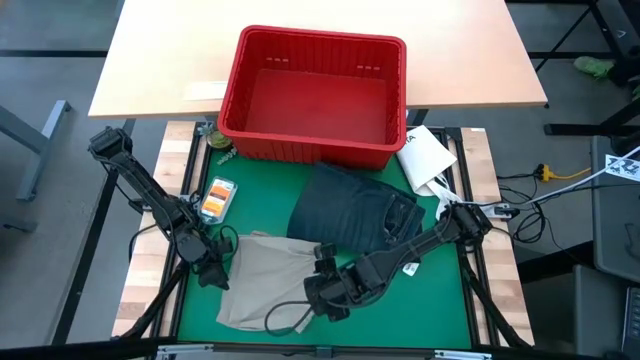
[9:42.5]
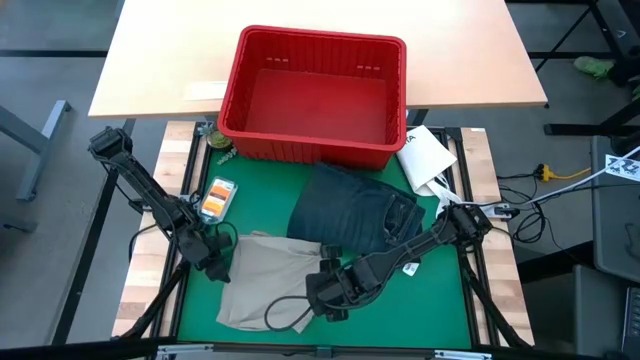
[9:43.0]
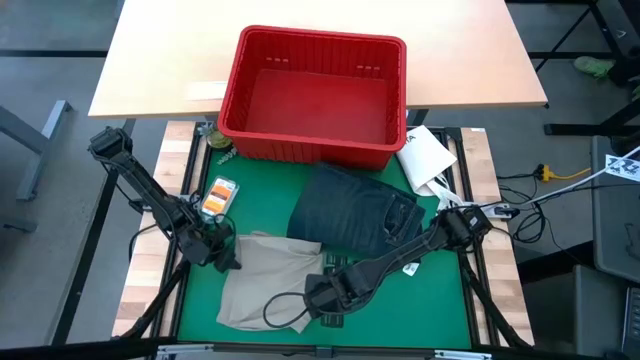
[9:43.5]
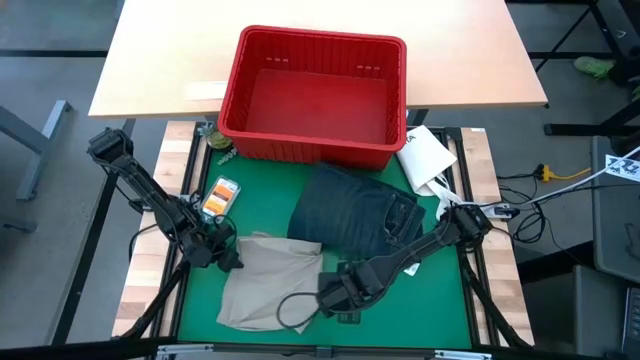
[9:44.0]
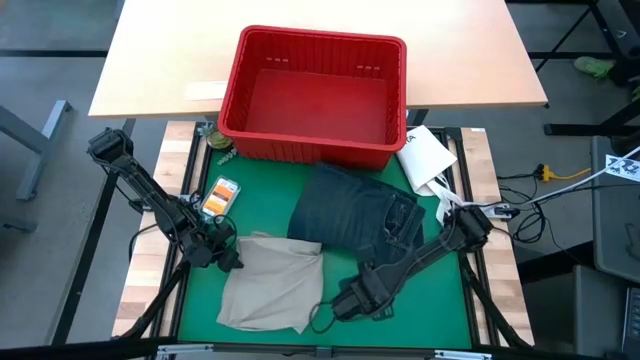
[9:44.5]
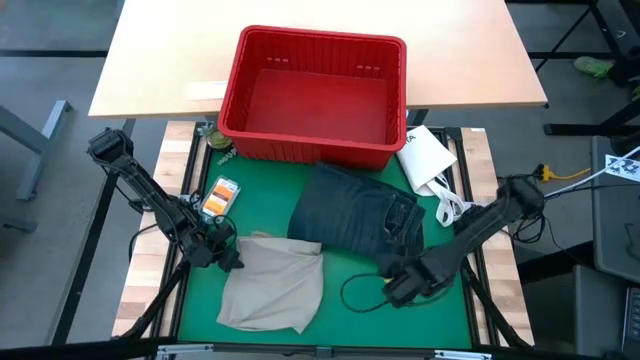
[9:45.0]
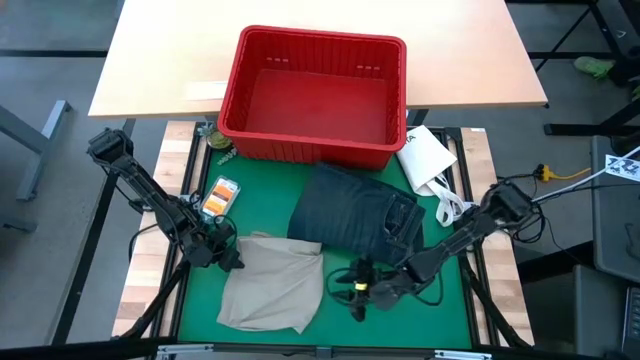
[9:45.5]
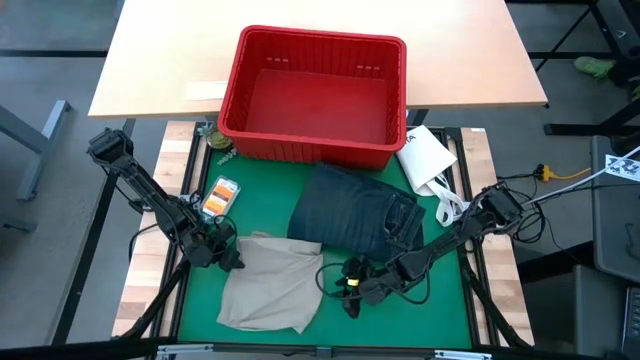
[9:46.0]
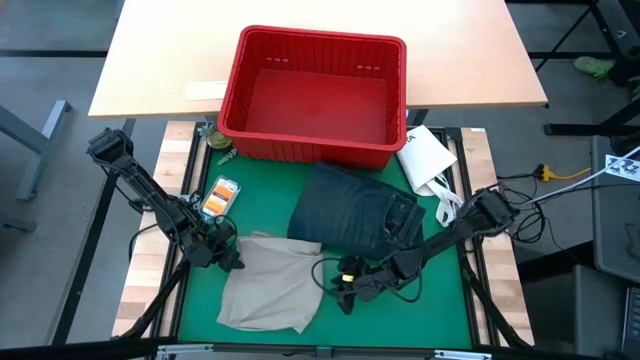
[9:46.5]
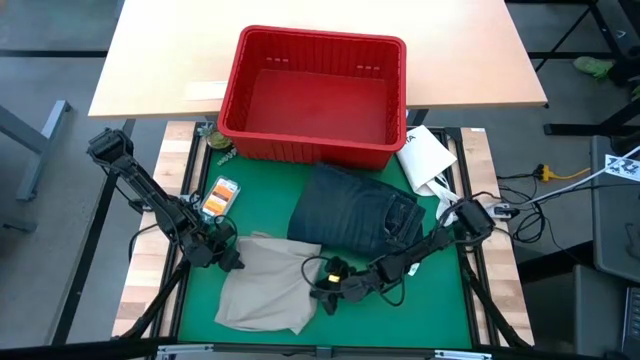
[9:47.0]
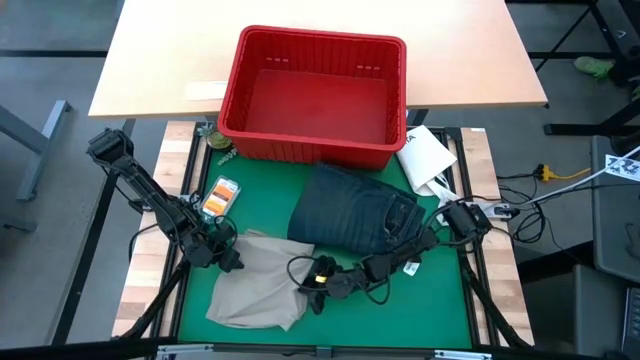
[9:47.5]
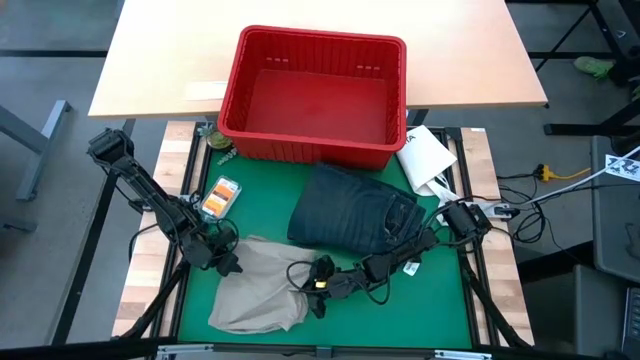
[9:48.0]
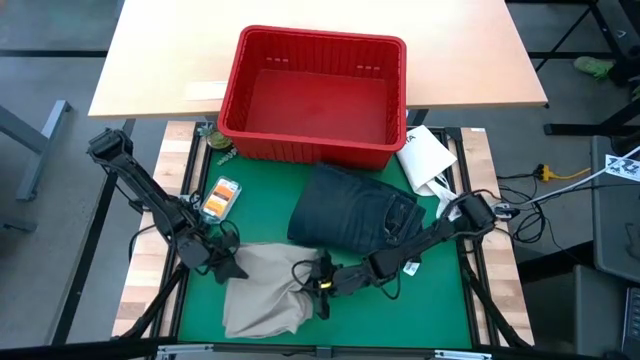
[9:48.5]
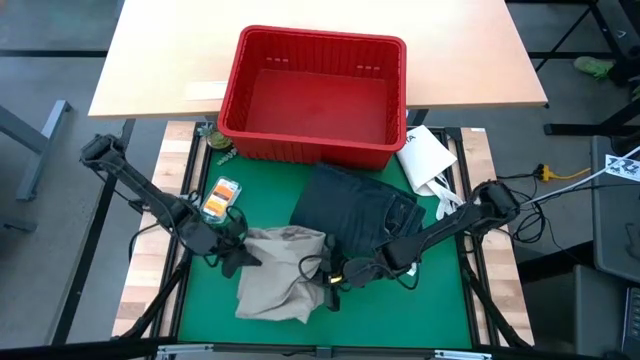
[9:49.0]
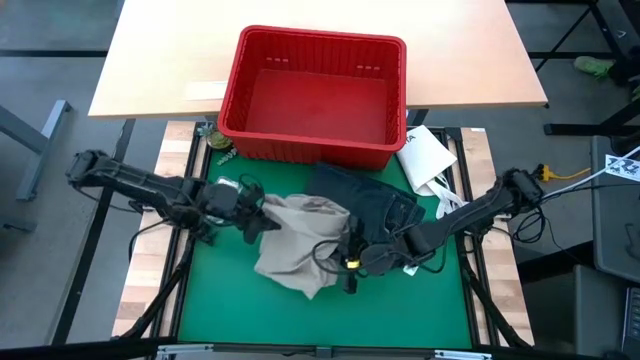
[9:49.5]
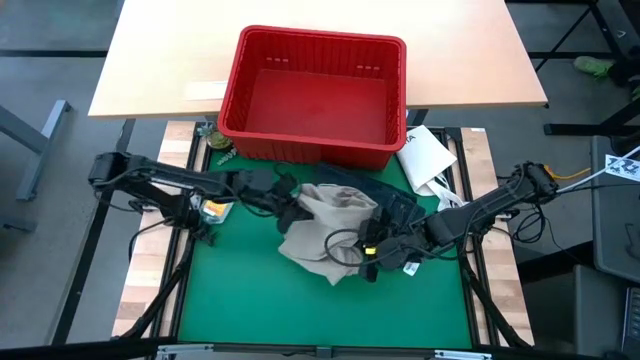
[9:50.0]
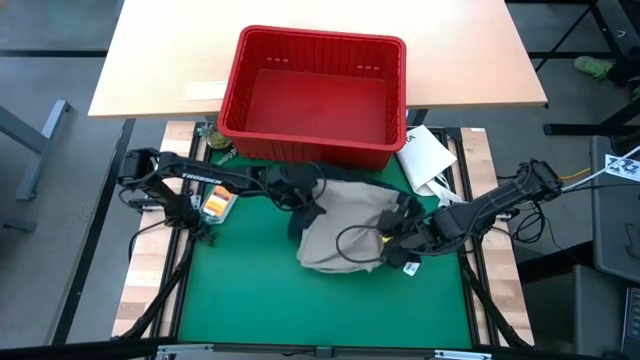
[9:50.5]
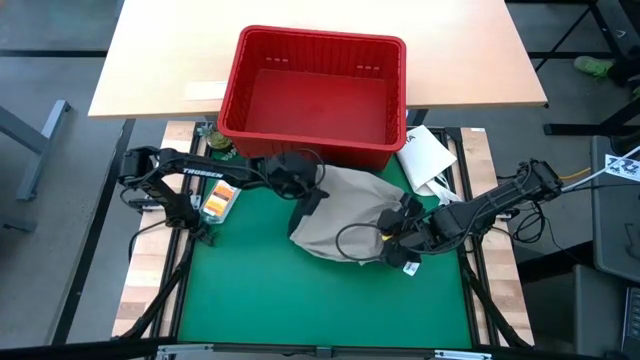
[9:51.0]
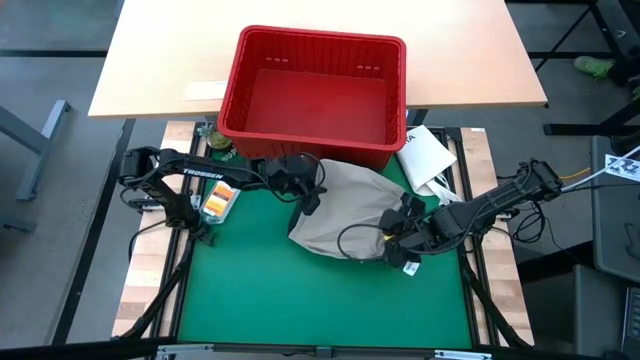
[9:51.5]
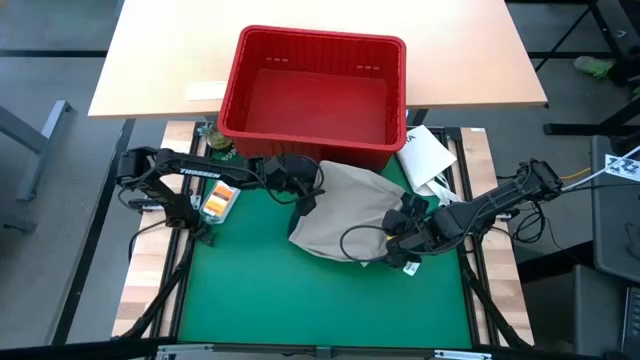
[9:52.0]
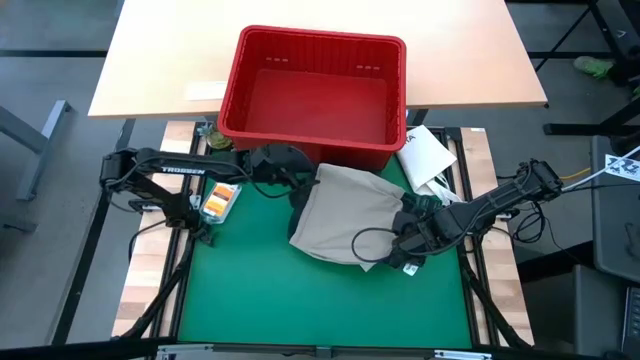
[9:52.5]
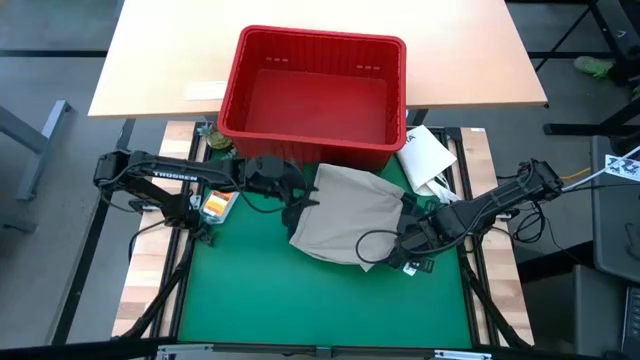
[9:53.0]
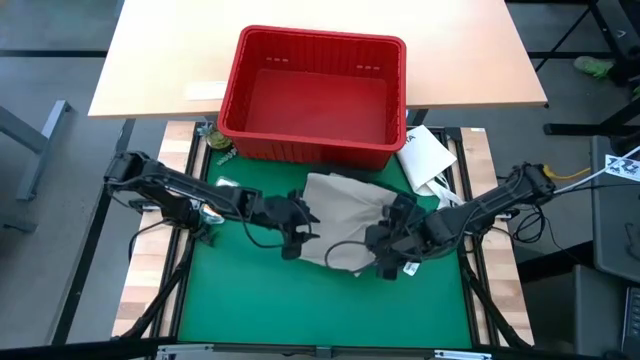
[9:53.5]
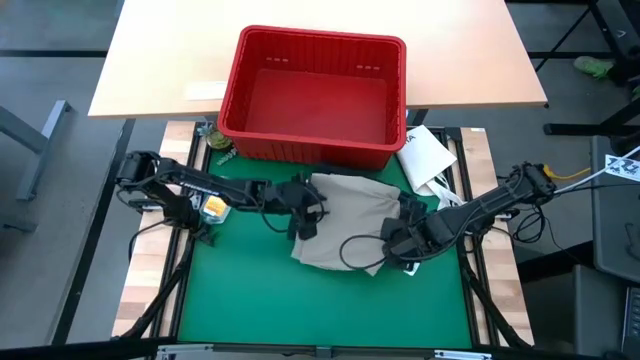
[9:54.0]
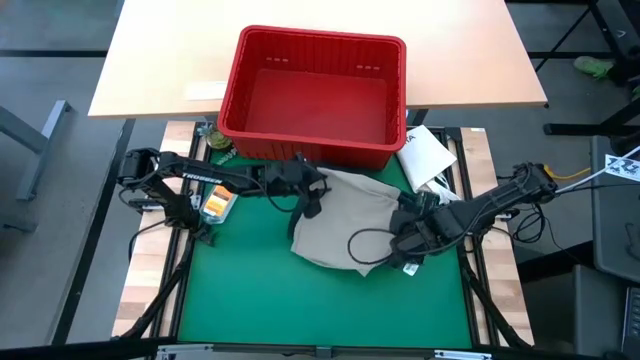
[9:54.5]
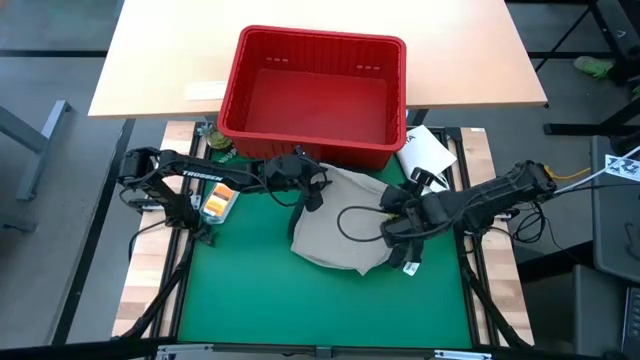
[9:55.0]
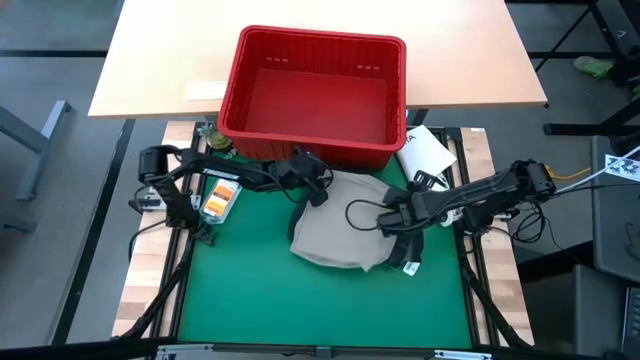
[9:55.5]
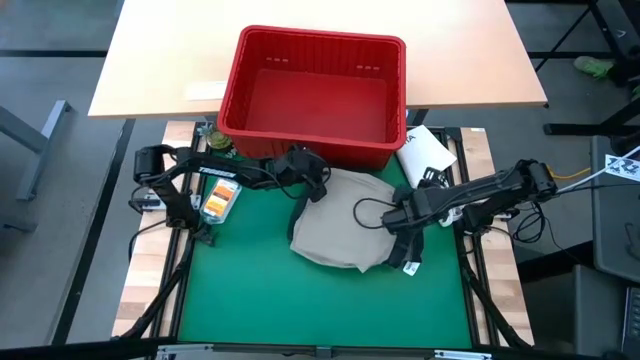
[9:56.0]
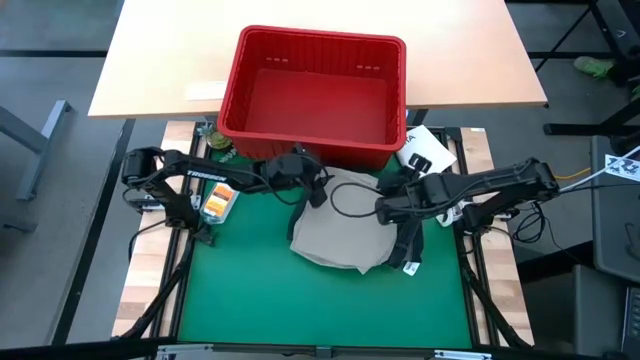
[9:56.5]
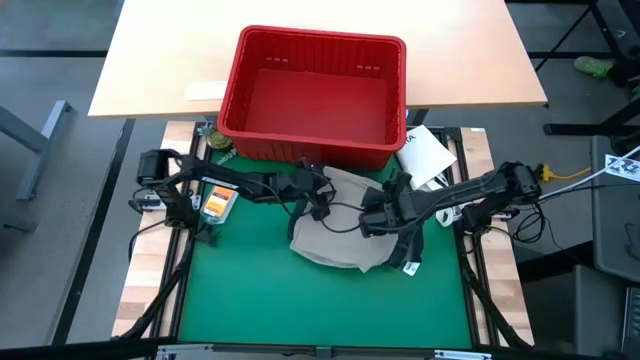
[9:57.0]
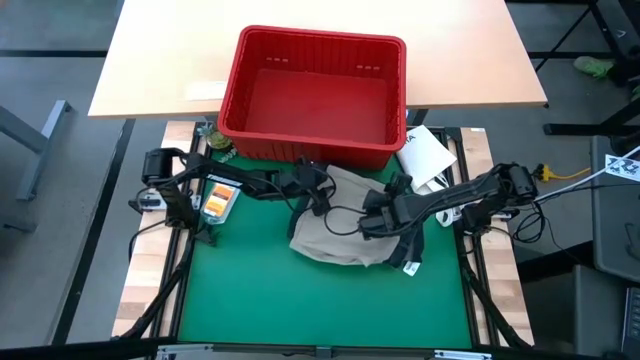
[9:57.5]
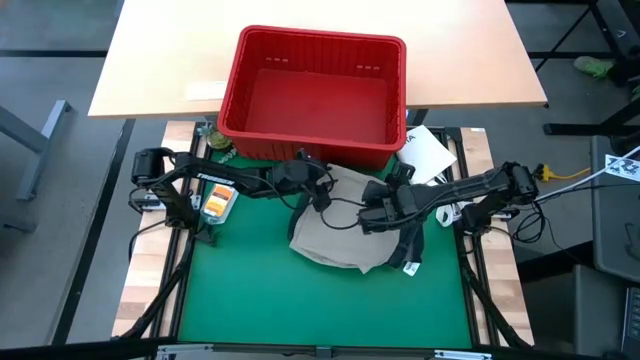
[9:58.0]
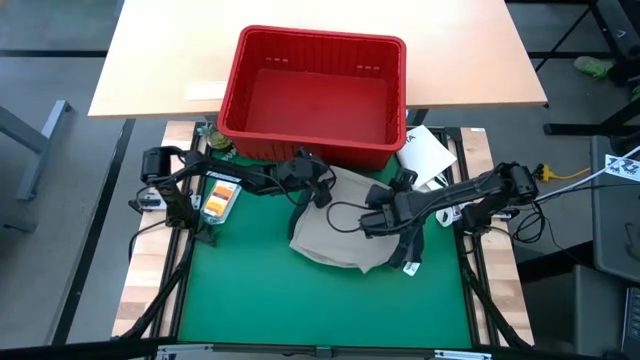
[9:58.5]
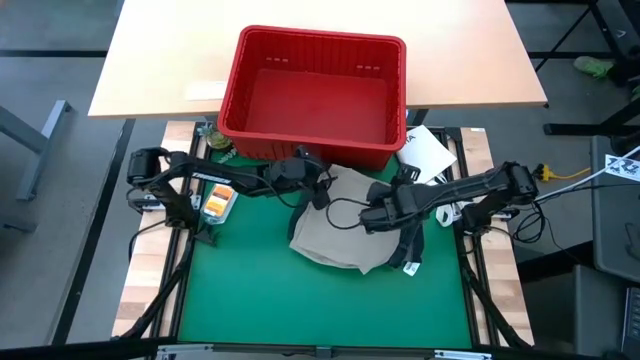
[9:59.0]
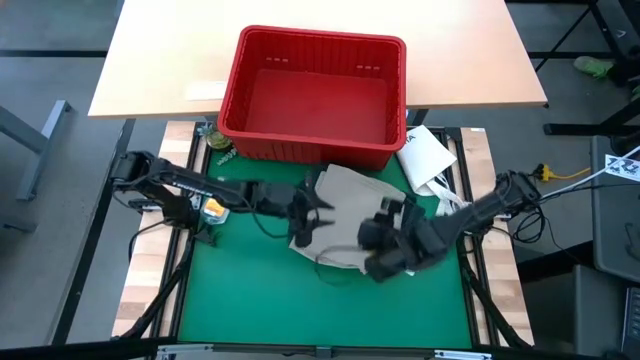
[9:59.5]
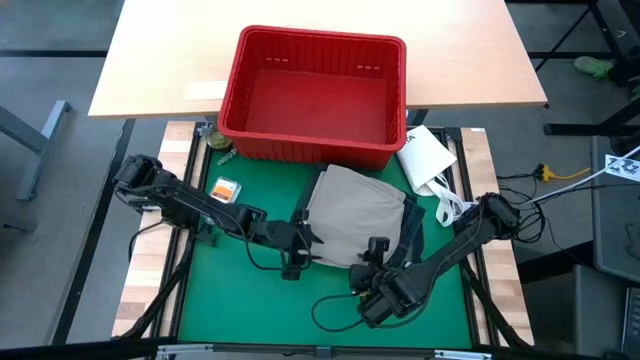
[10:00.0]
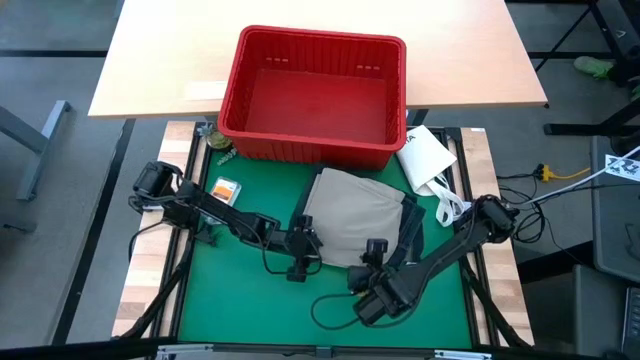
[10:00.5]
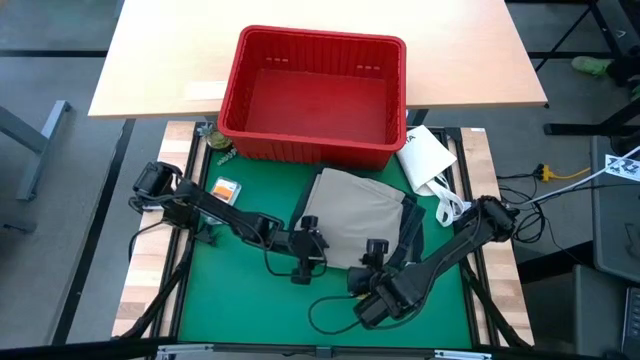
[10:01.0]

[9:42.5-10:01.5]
Task: Fold Laundry from Bin
Stack the folded gray shorts on top of the folded dark blue pants

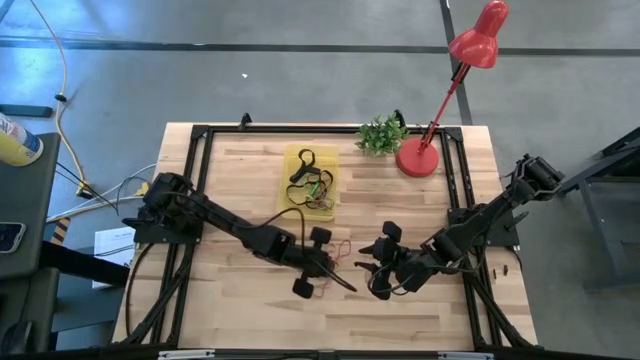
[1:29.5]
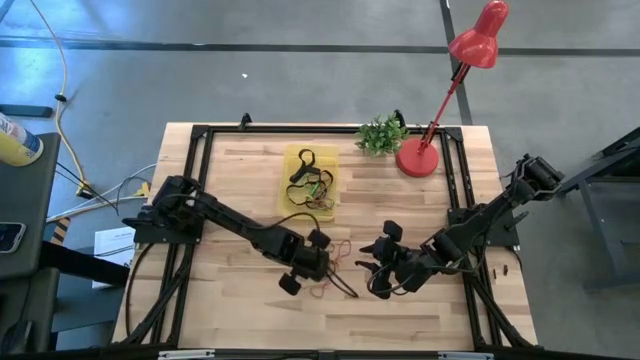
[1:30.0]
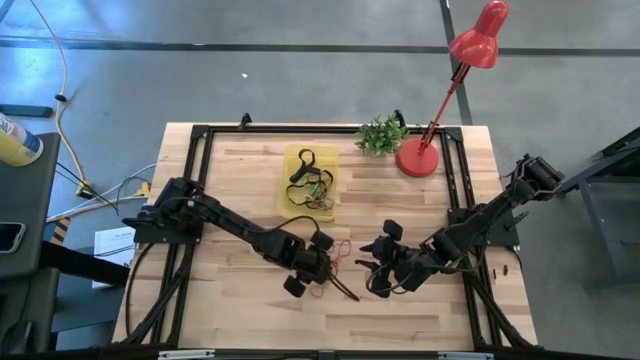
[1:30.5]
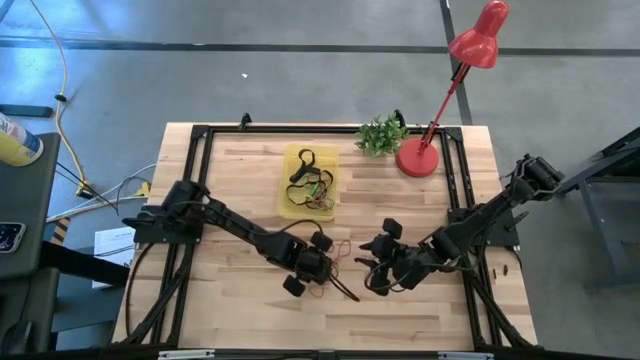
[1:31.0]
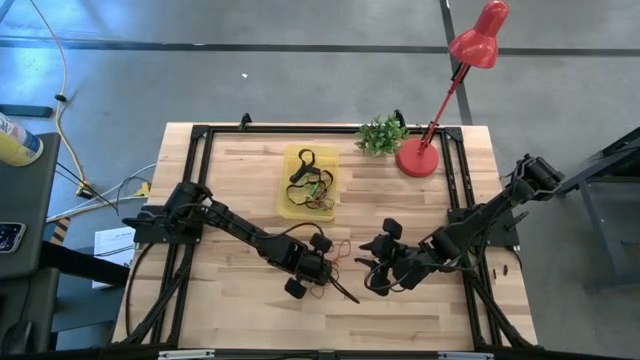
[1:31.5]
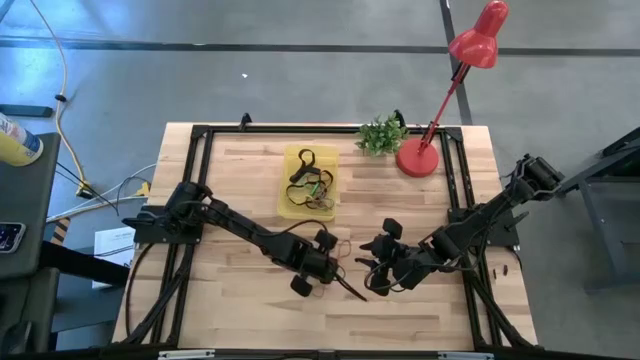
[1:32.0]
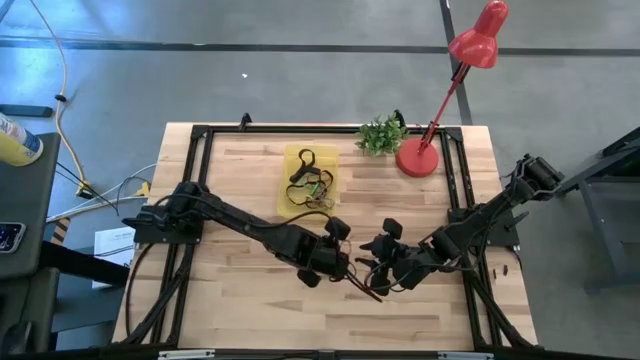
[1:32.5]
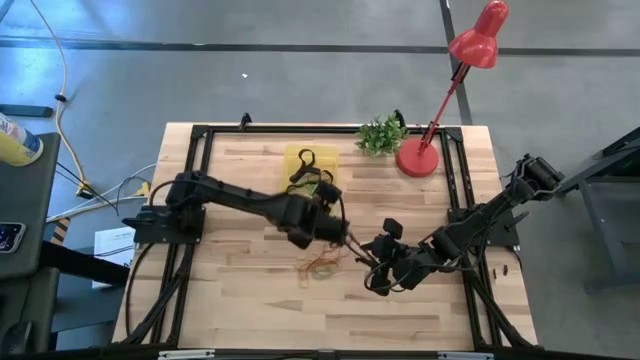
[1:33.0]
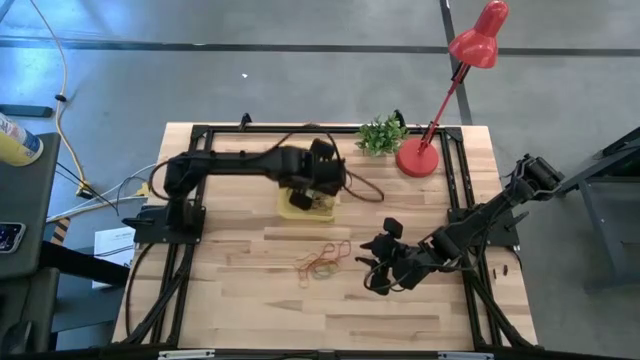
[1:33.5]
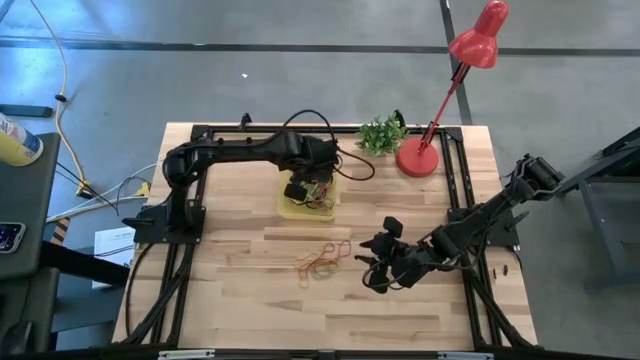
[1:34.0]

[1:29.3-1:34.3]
Task: Pick and place rubber bands into bin
Put the red rubber band into the yellow bin
